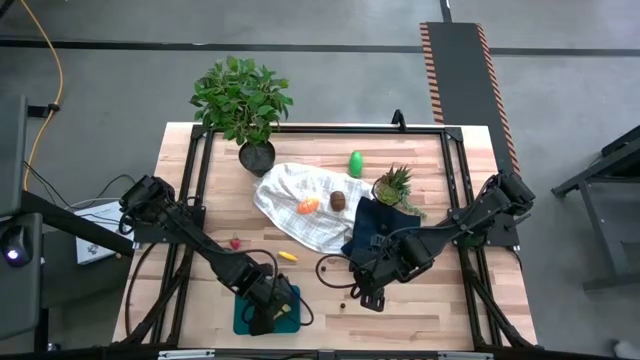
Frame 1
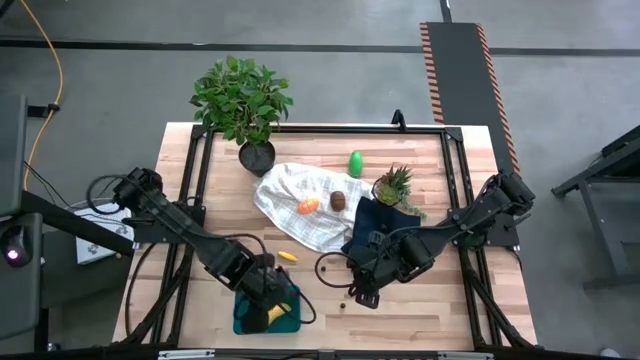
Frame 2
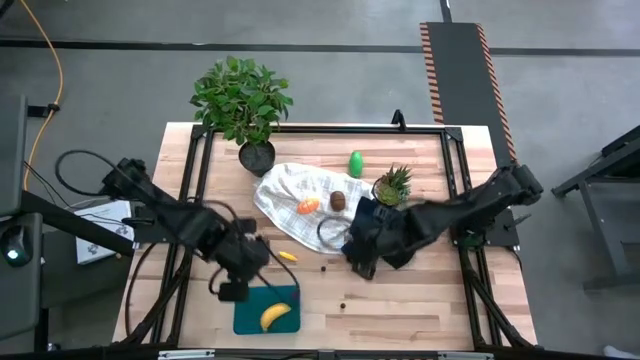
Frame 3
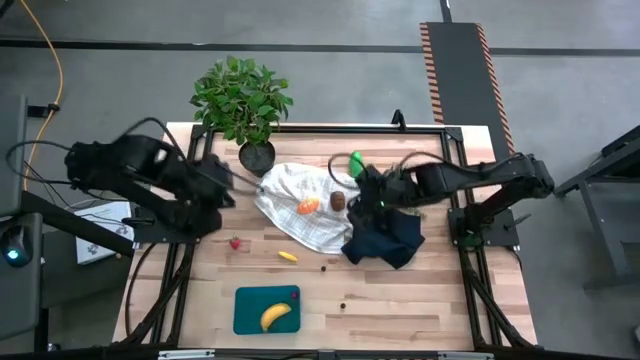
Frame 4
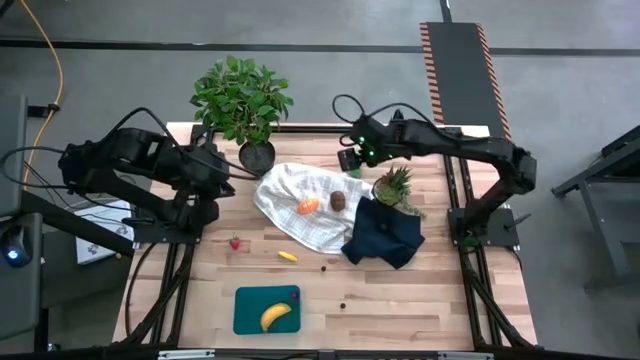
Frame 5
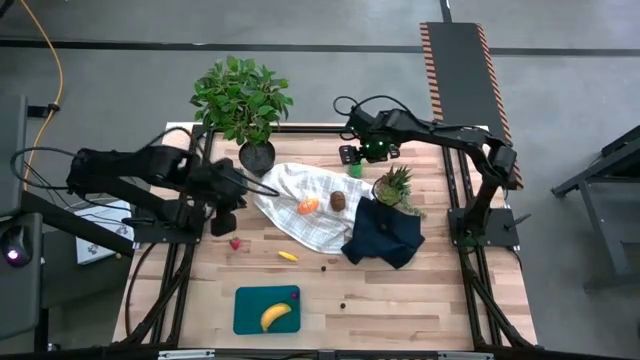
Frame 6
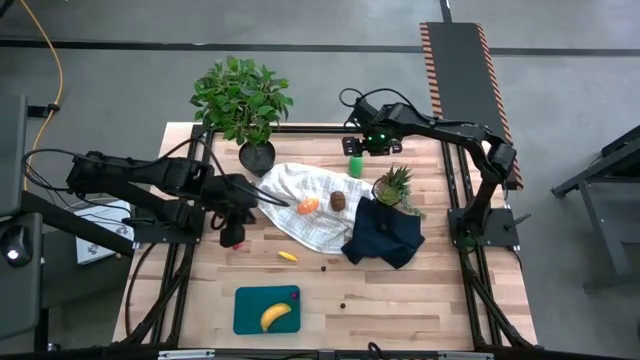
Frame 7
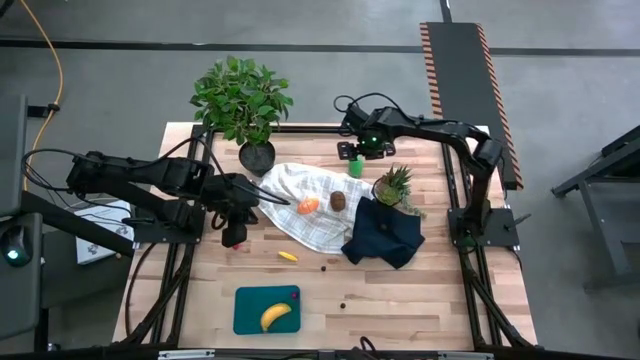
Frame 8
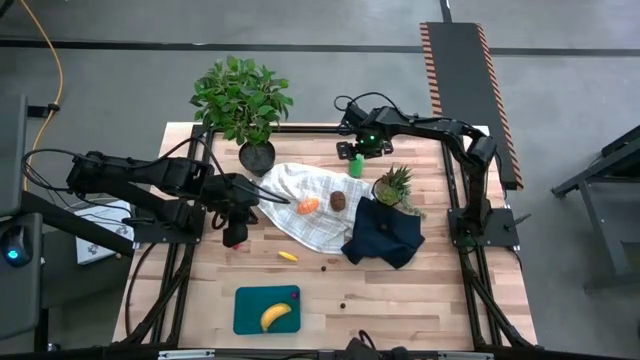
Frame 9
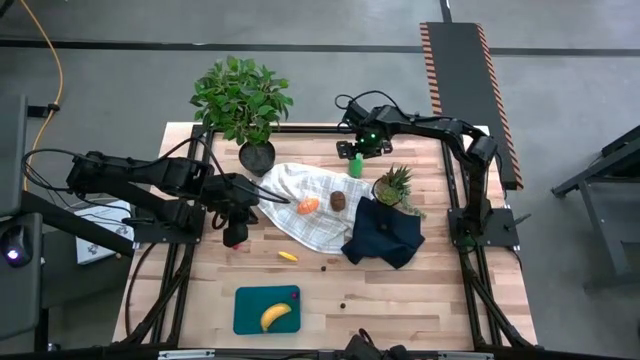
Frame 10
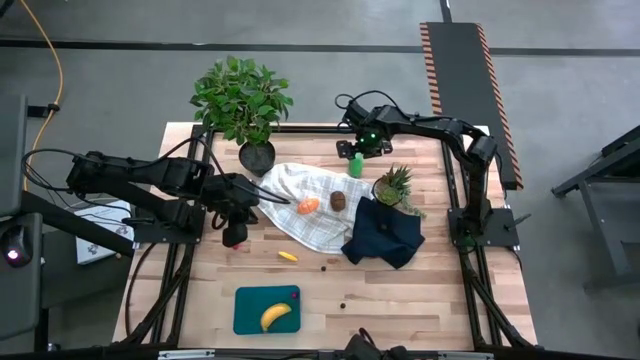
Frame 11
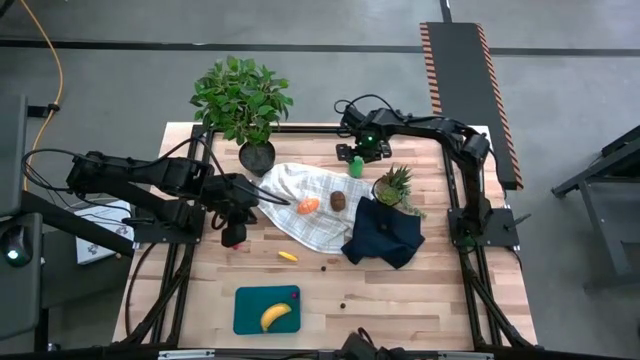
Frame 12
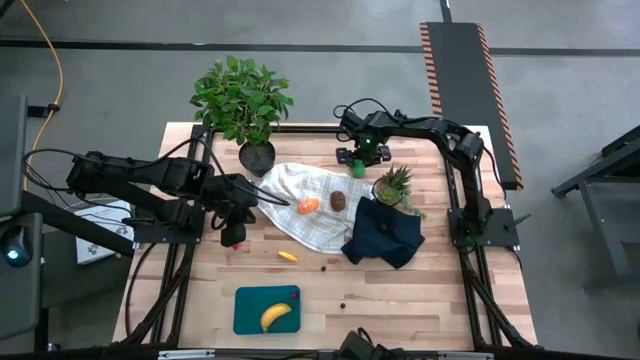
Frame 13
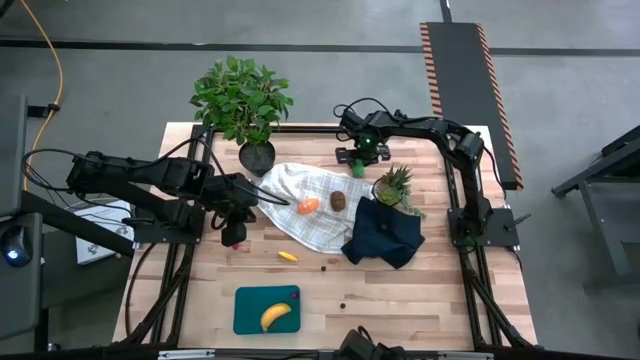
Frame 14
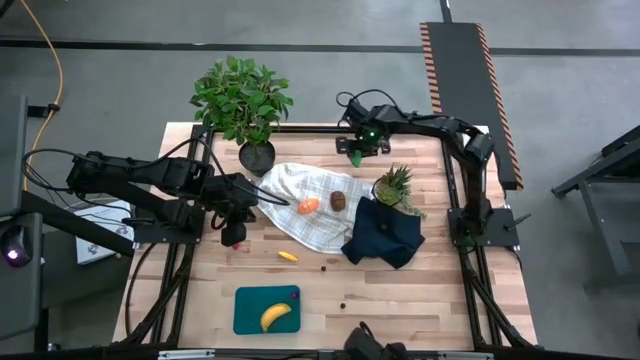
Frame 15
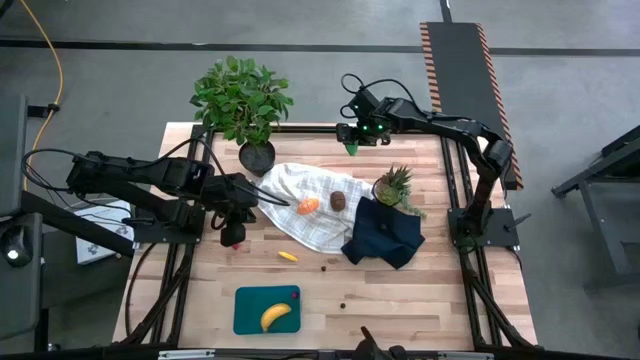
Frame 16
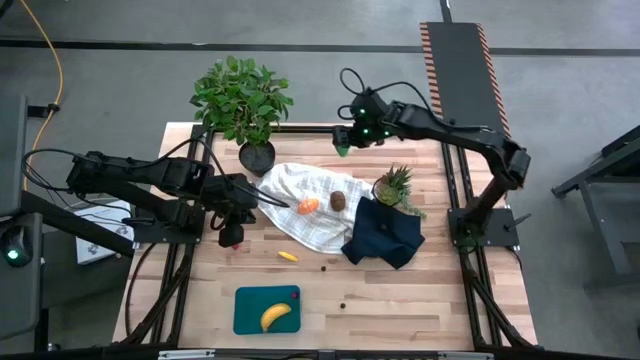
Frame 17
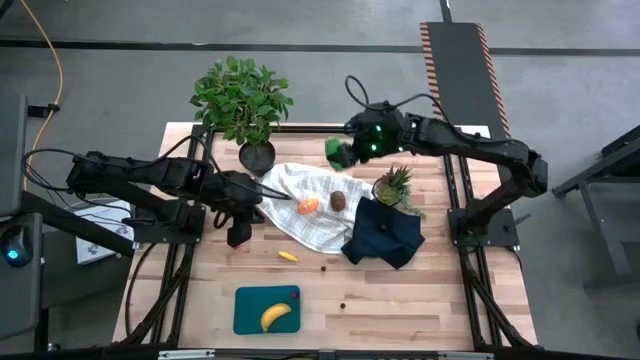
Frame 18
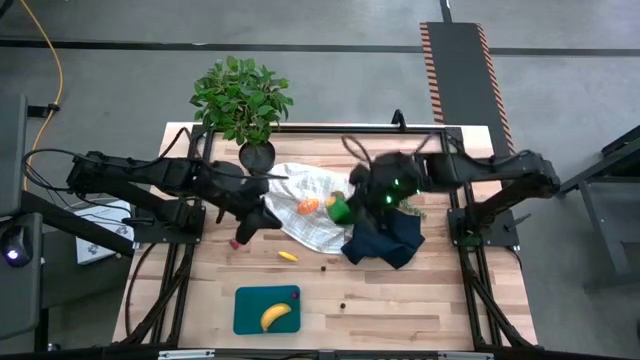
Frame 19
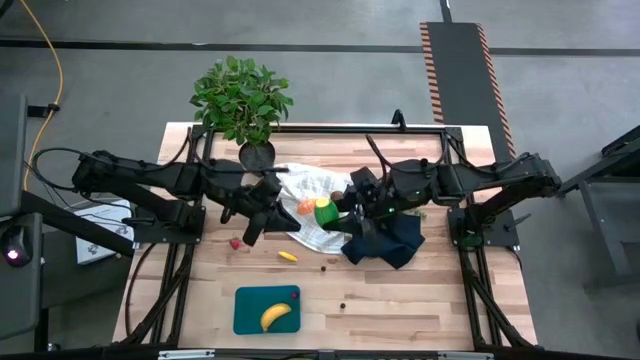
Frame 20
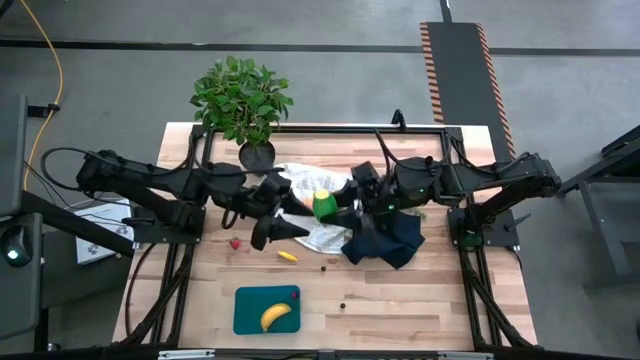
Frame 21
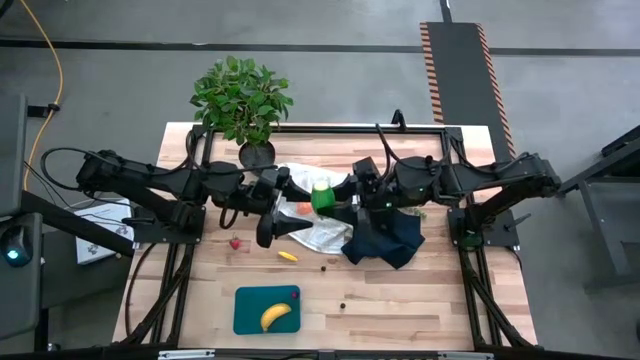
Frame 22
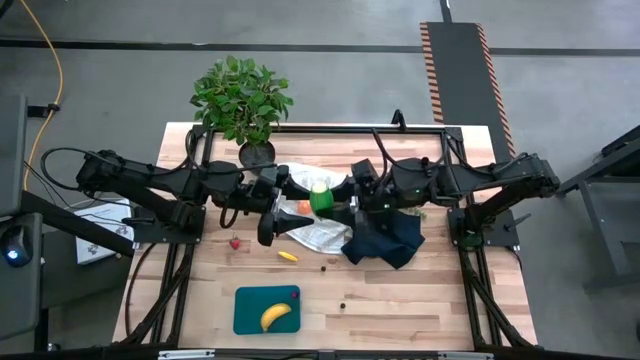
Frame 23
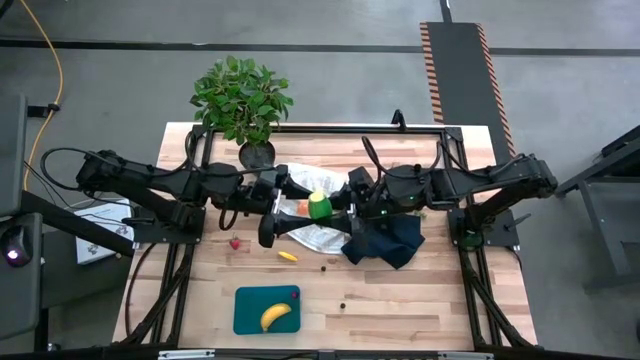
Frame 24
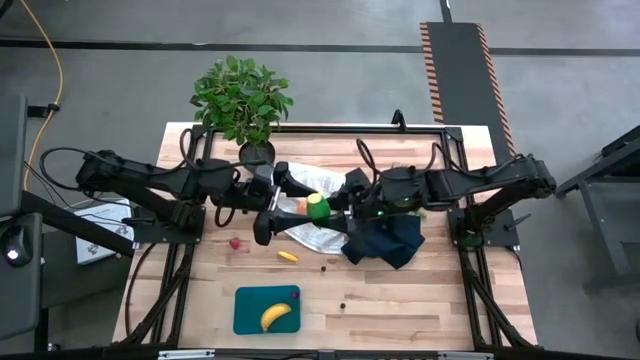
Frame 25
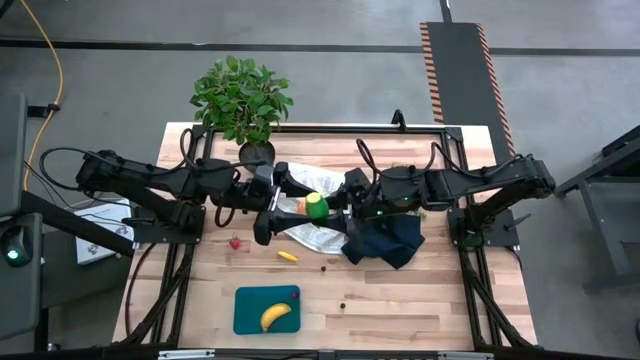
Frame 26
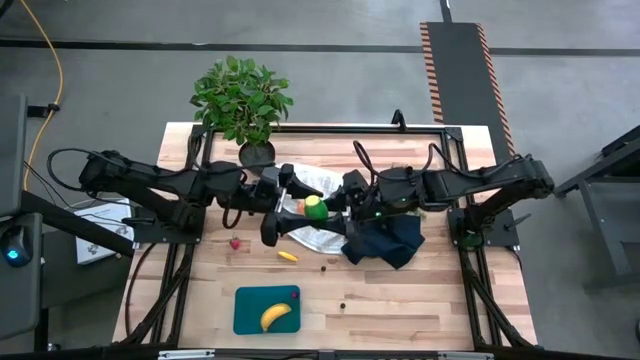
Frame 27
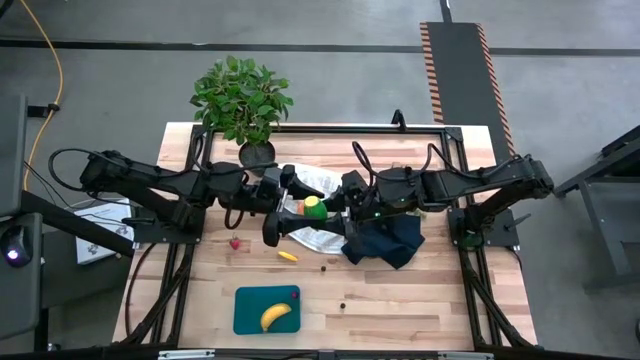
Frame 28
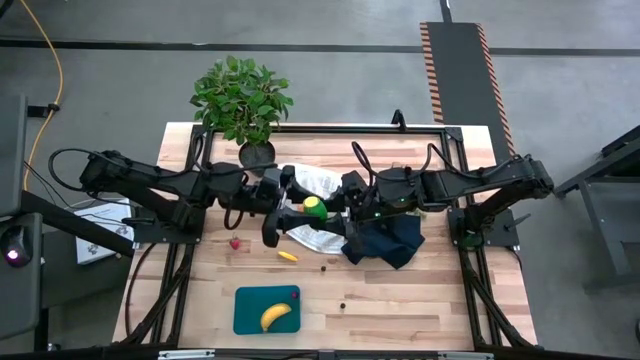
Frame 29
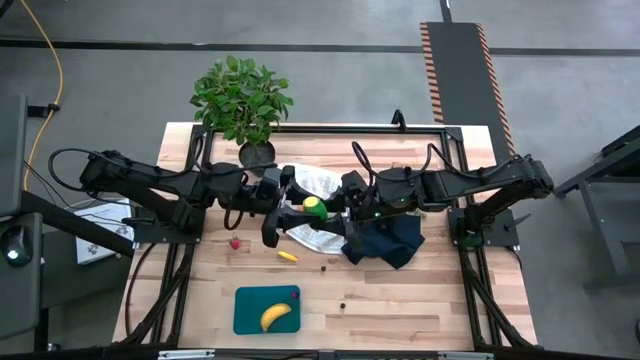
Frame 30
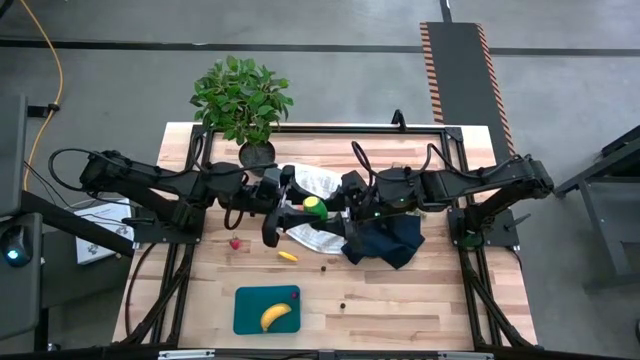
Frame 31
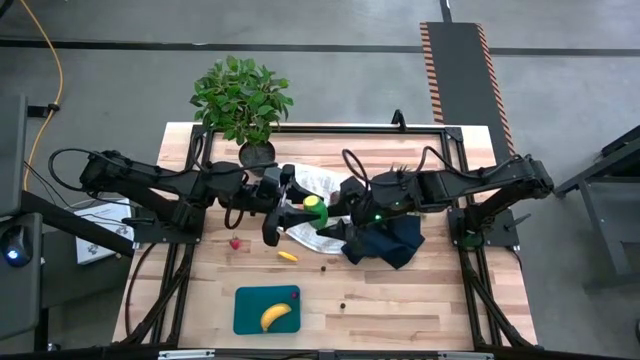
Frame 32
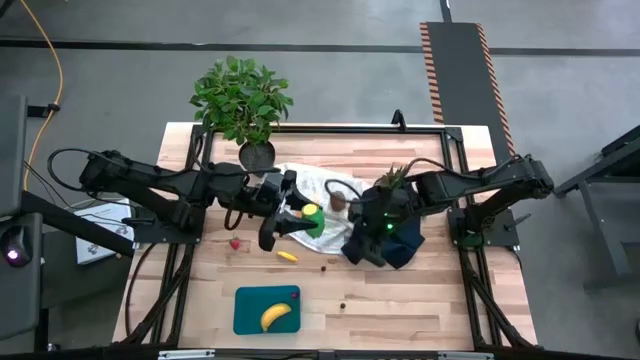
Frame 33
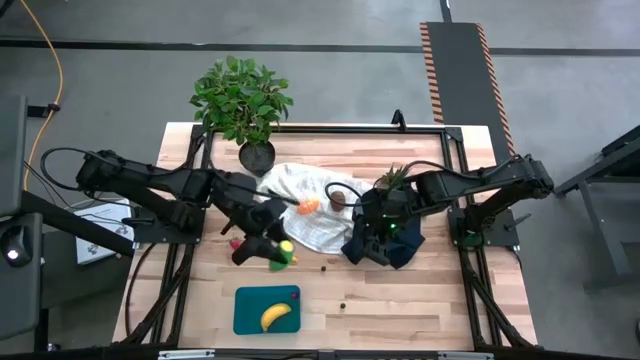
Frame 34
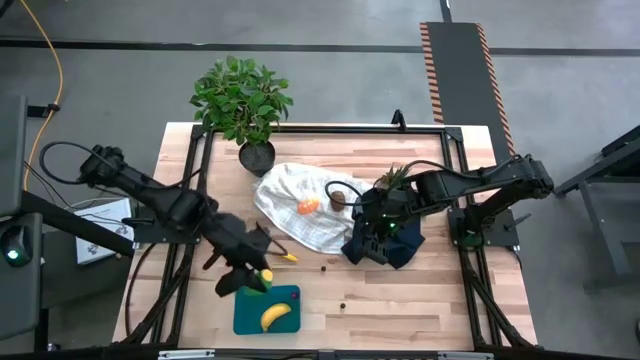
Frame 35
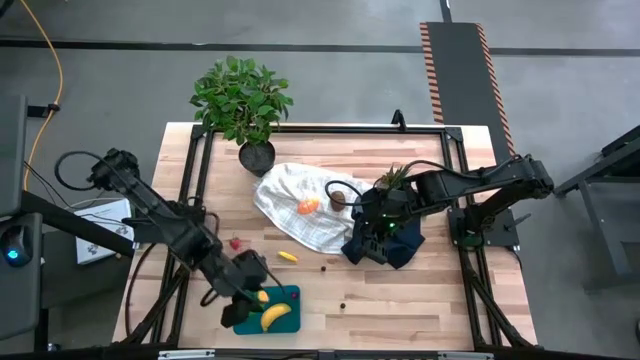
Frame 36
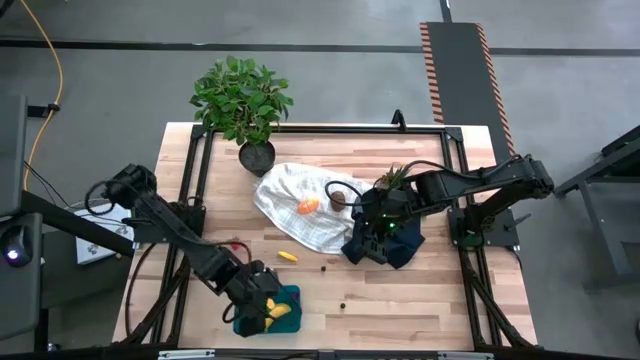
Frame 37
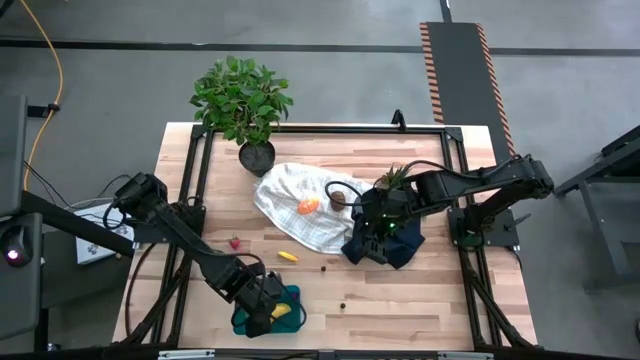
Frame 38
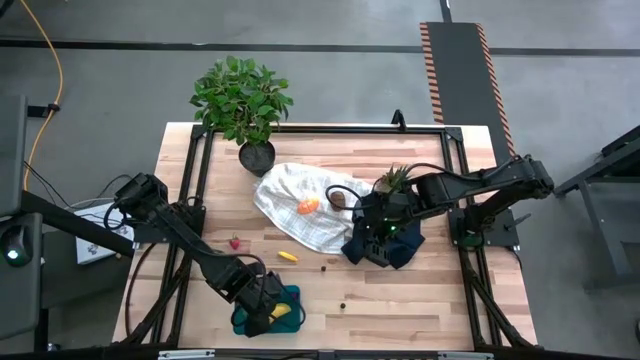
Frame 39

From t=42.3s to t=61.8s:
Task: Pick and placing Produce into tupperware
Put the corn into the bin

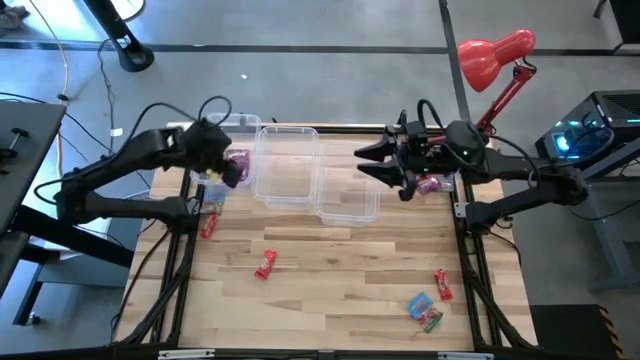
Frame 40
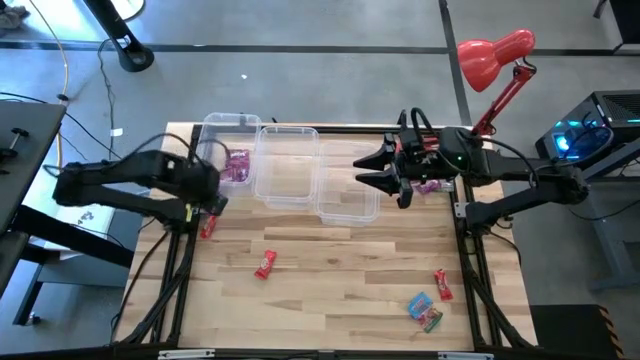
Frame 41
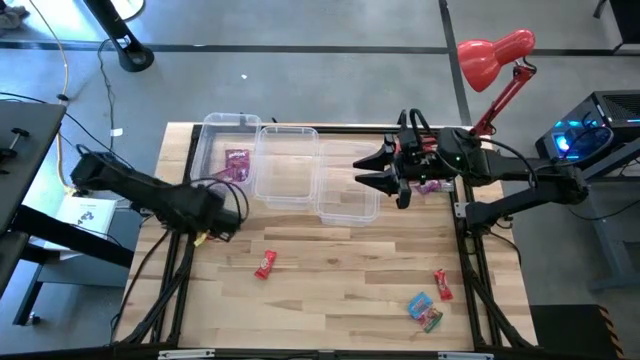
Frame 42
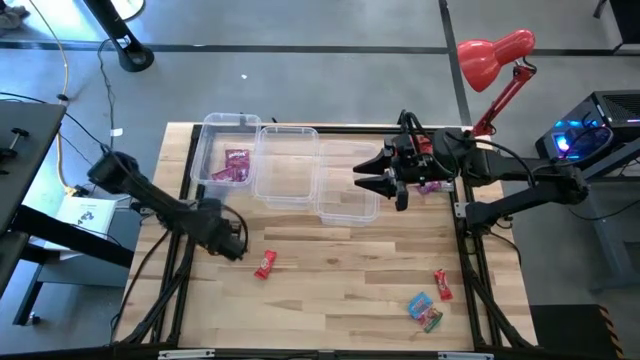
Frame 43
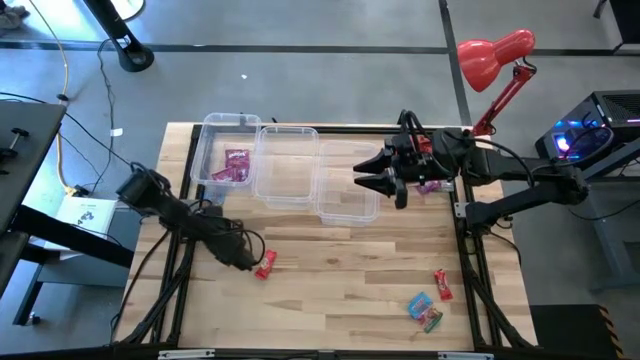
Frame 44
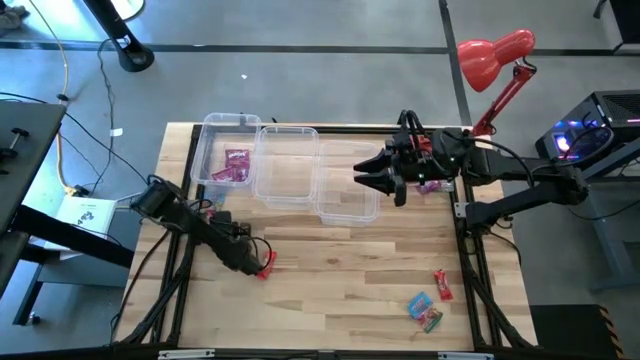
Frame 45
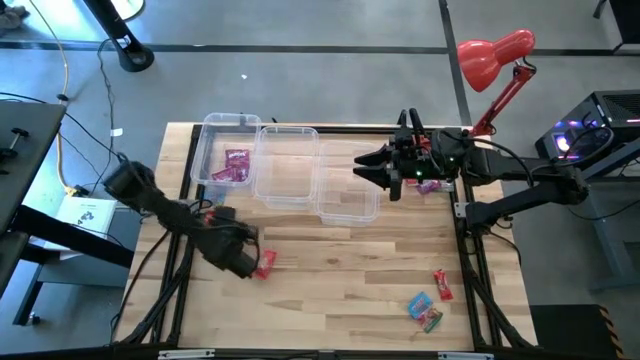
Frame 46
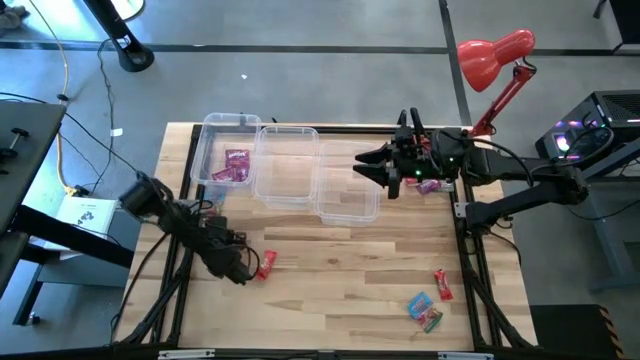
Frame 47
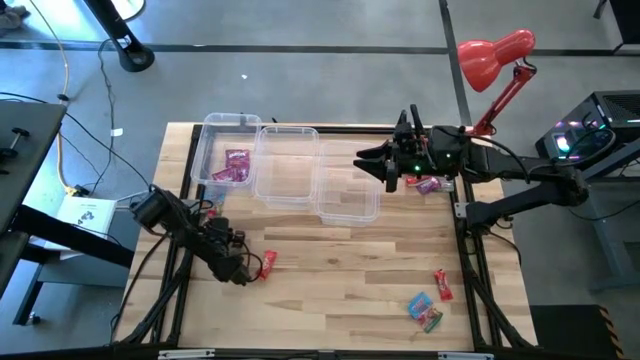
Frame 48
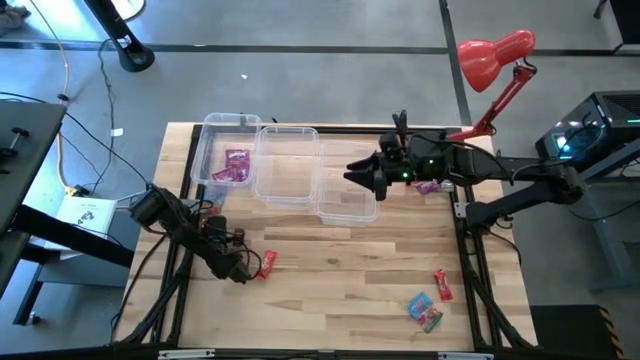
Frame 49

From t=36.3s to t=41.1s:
Task: Sort candy
Put the red candy bag into the center transparent bin
